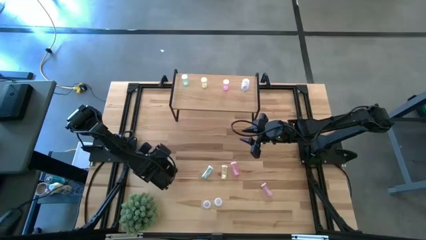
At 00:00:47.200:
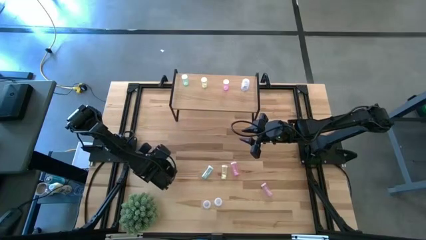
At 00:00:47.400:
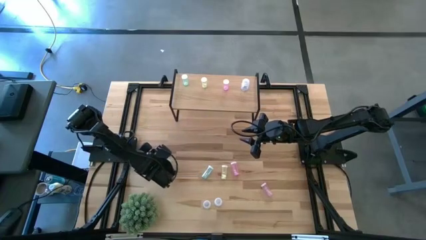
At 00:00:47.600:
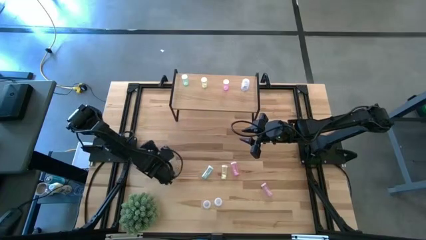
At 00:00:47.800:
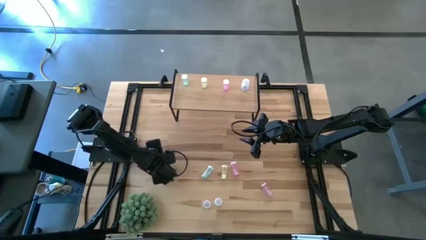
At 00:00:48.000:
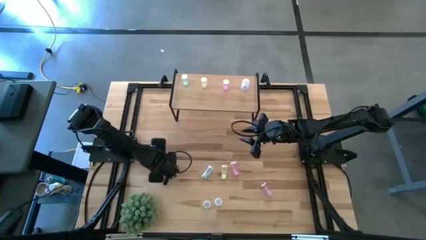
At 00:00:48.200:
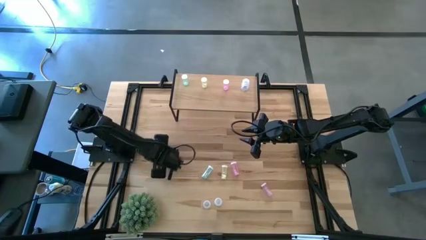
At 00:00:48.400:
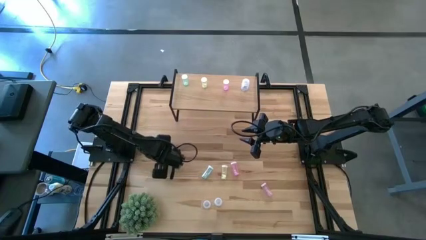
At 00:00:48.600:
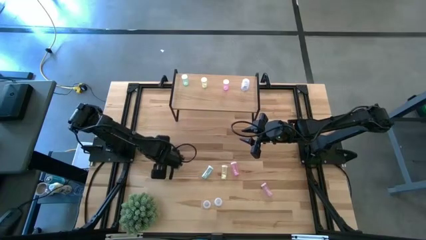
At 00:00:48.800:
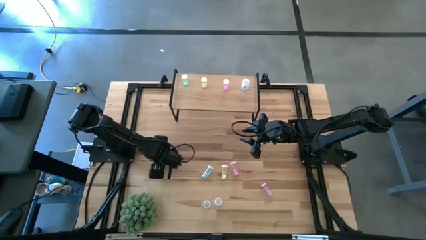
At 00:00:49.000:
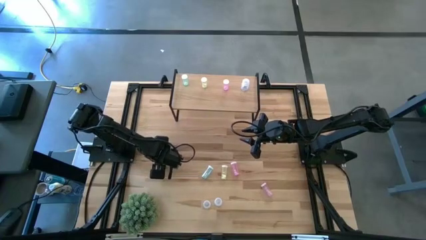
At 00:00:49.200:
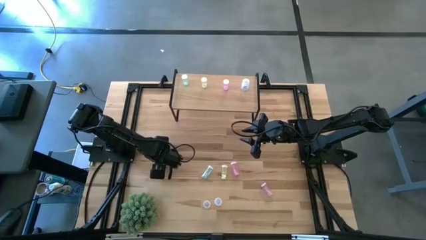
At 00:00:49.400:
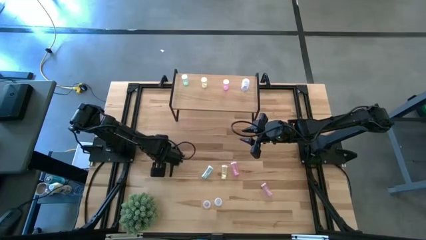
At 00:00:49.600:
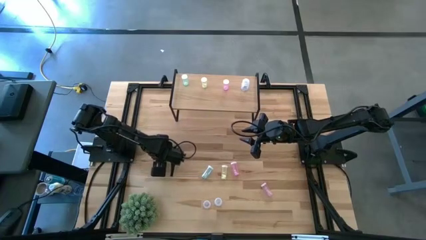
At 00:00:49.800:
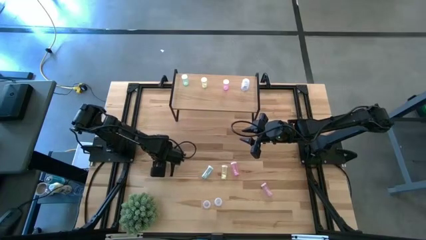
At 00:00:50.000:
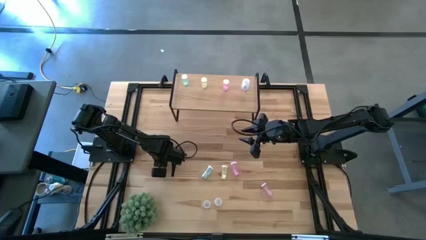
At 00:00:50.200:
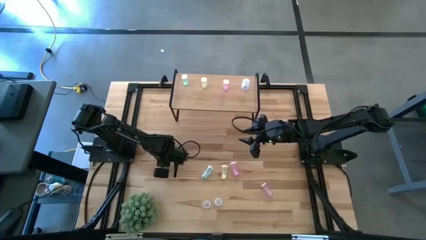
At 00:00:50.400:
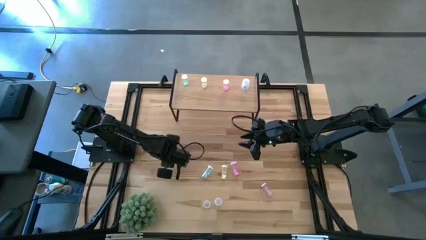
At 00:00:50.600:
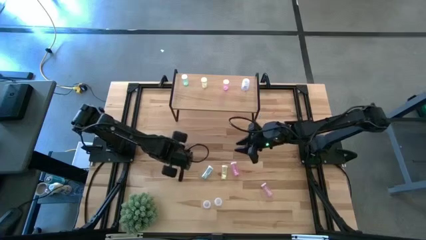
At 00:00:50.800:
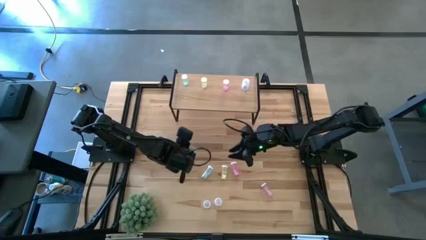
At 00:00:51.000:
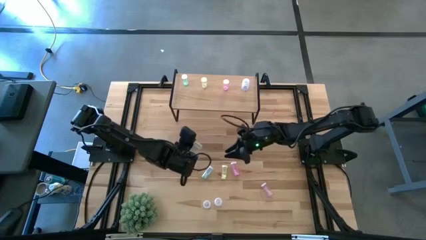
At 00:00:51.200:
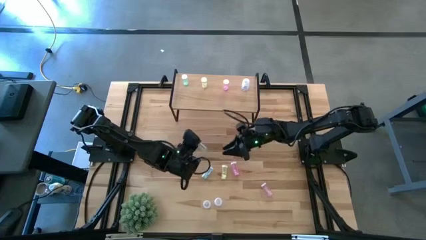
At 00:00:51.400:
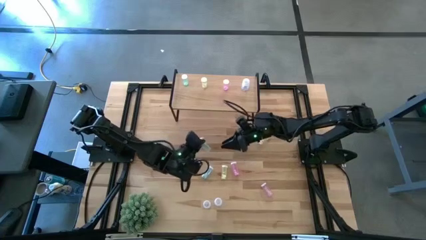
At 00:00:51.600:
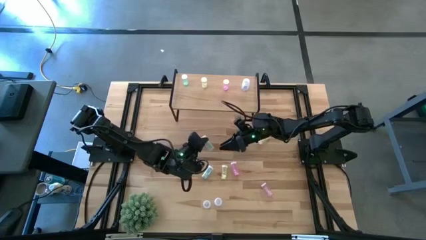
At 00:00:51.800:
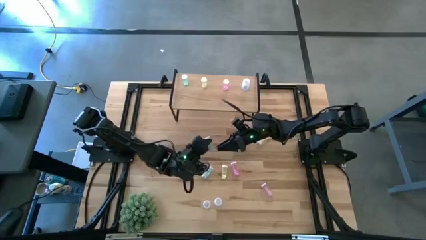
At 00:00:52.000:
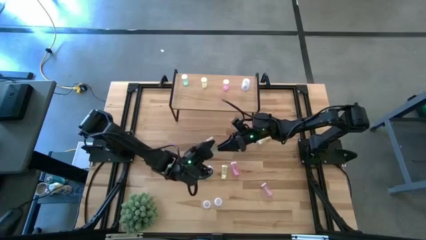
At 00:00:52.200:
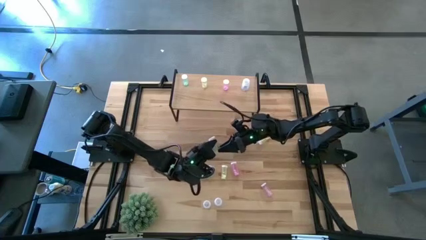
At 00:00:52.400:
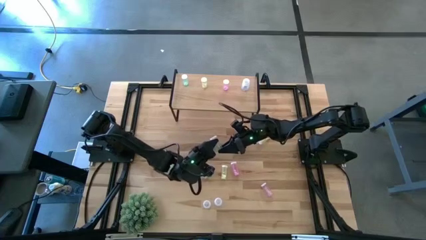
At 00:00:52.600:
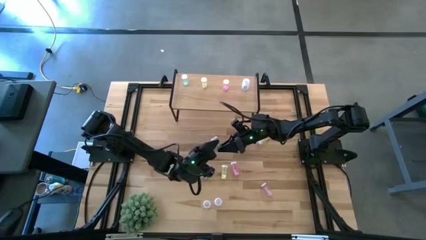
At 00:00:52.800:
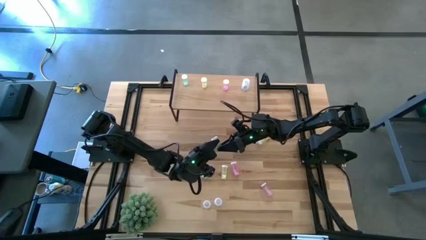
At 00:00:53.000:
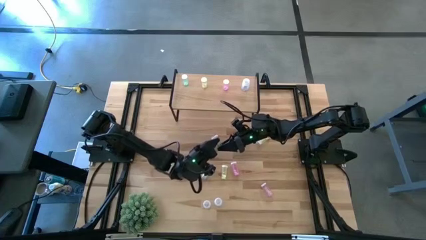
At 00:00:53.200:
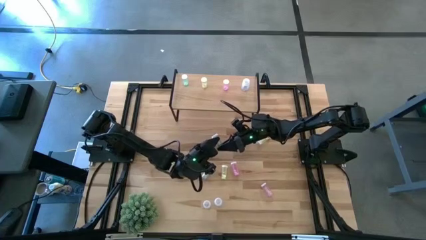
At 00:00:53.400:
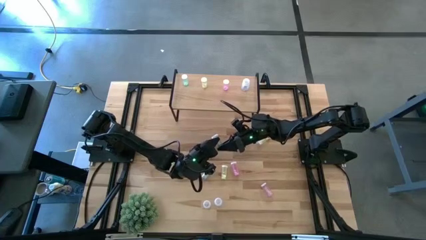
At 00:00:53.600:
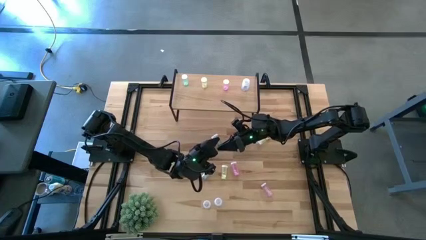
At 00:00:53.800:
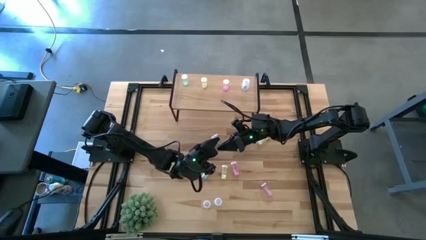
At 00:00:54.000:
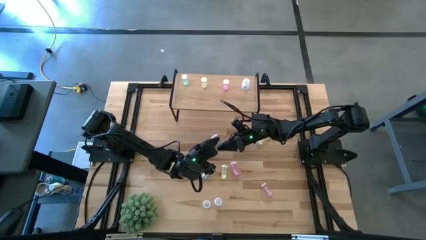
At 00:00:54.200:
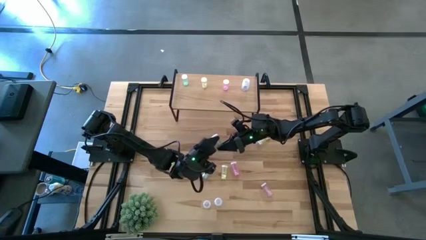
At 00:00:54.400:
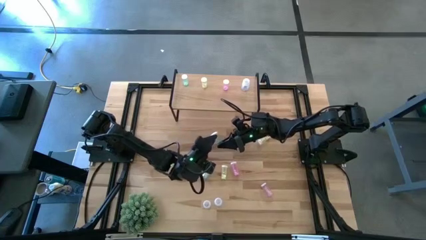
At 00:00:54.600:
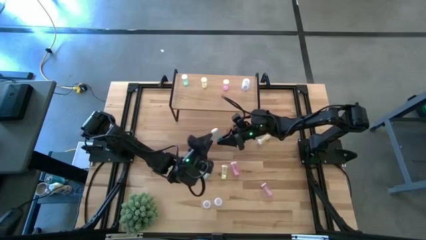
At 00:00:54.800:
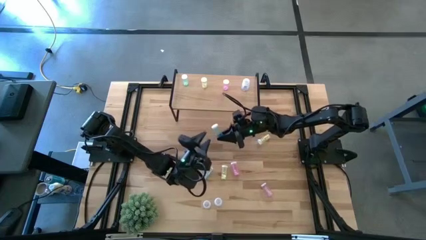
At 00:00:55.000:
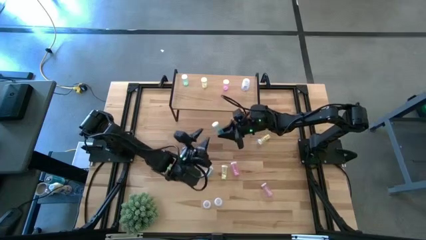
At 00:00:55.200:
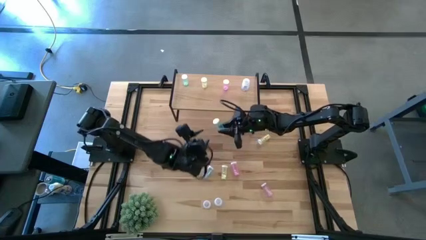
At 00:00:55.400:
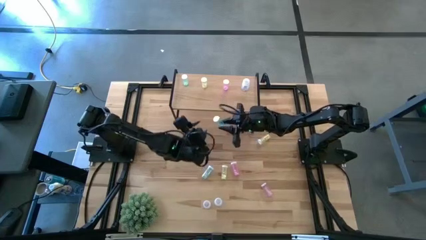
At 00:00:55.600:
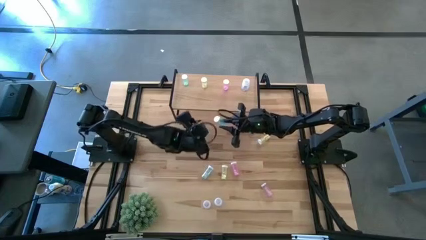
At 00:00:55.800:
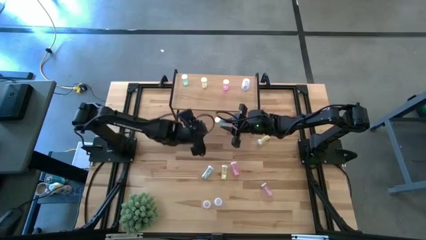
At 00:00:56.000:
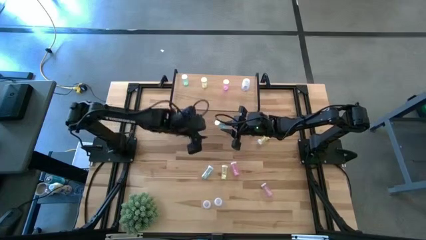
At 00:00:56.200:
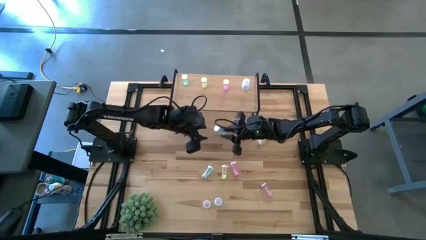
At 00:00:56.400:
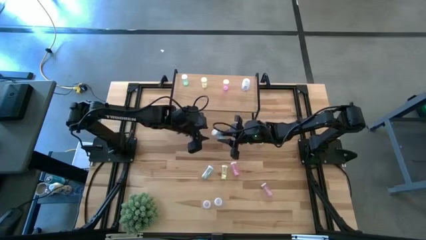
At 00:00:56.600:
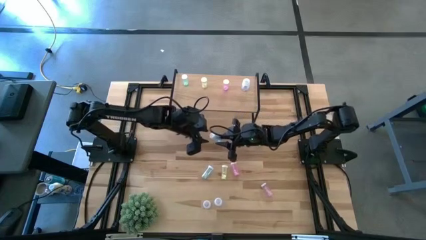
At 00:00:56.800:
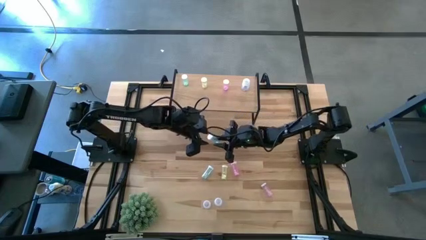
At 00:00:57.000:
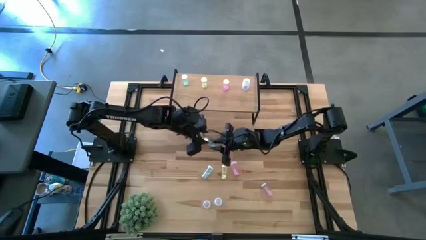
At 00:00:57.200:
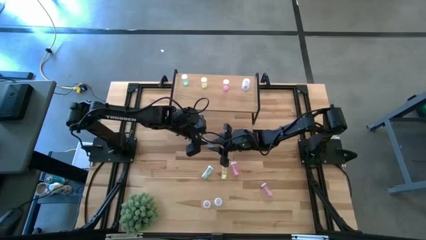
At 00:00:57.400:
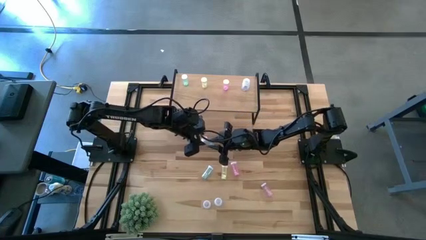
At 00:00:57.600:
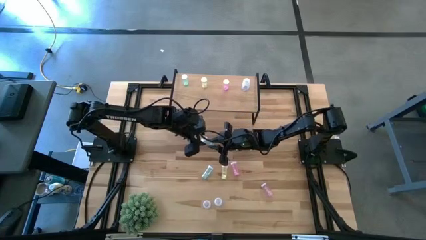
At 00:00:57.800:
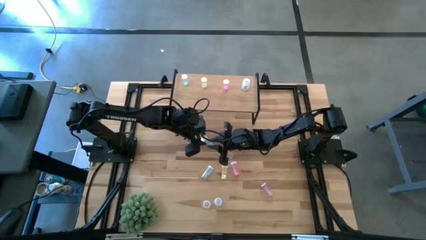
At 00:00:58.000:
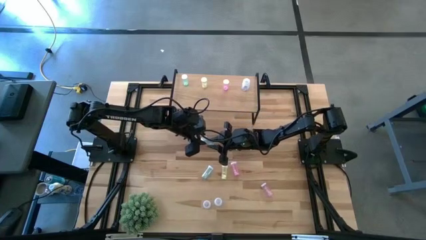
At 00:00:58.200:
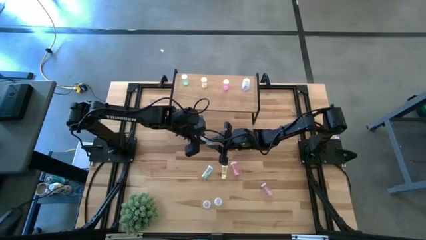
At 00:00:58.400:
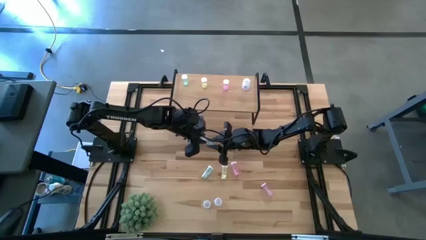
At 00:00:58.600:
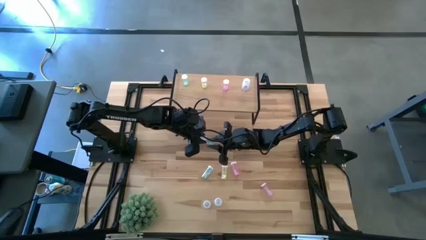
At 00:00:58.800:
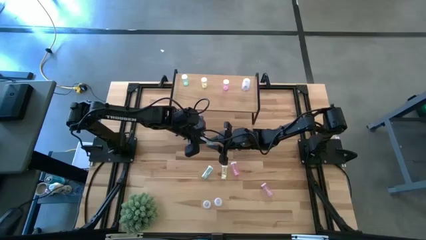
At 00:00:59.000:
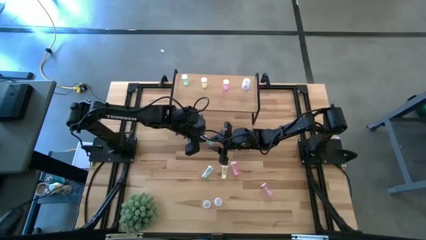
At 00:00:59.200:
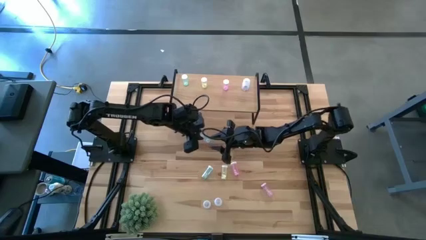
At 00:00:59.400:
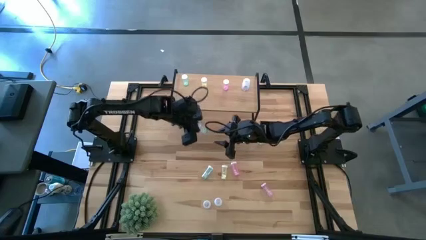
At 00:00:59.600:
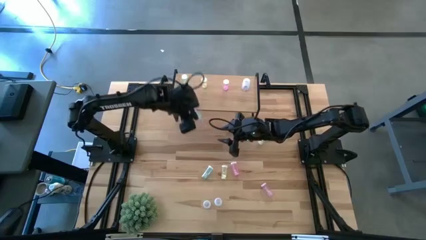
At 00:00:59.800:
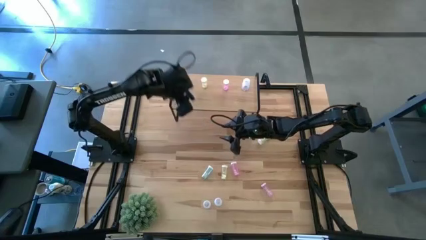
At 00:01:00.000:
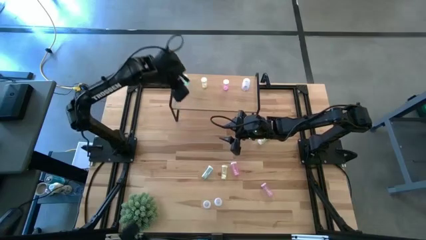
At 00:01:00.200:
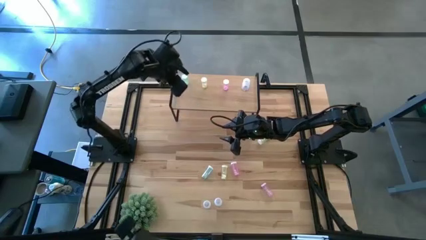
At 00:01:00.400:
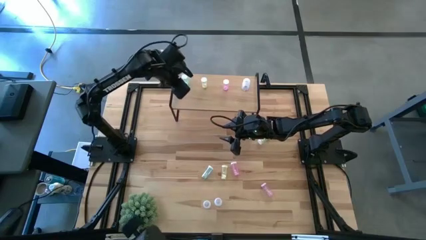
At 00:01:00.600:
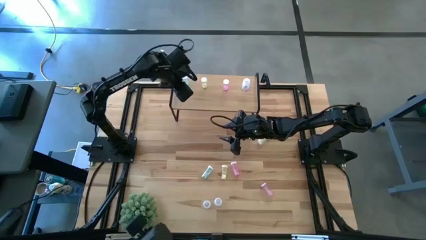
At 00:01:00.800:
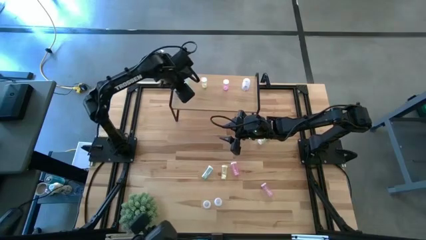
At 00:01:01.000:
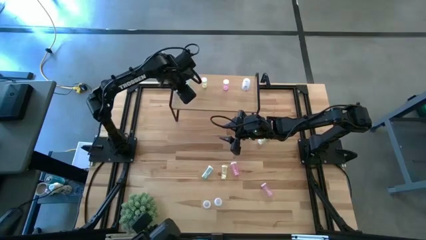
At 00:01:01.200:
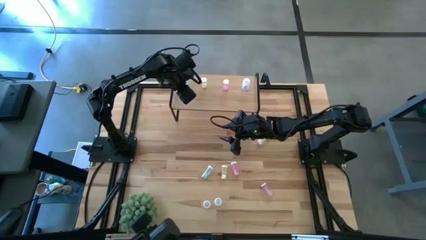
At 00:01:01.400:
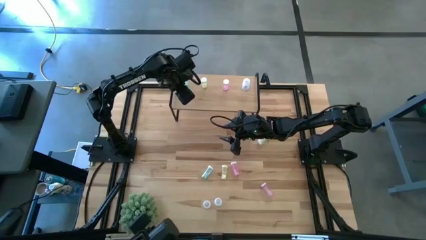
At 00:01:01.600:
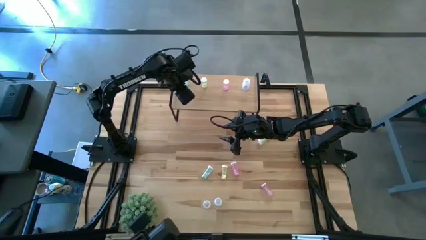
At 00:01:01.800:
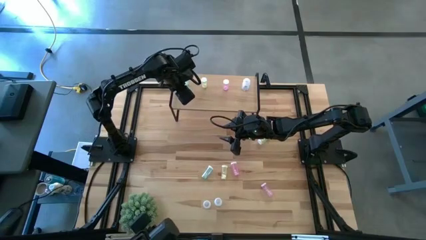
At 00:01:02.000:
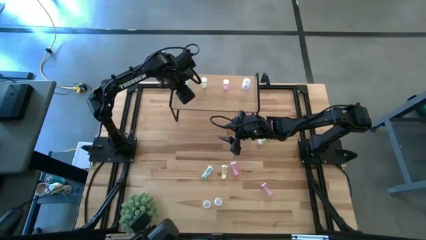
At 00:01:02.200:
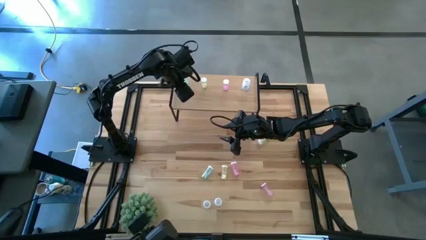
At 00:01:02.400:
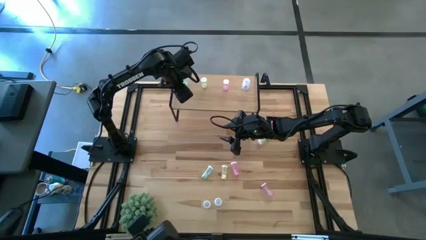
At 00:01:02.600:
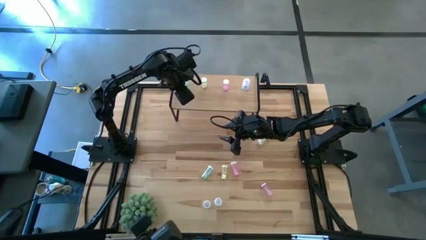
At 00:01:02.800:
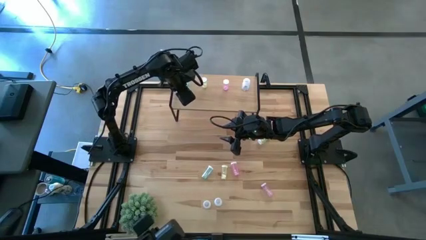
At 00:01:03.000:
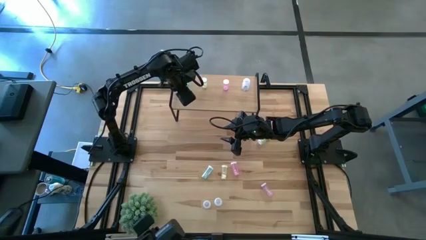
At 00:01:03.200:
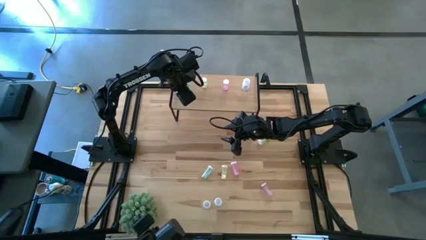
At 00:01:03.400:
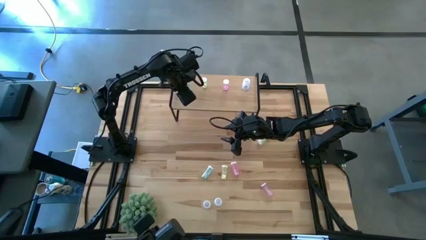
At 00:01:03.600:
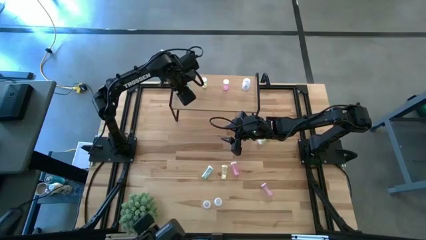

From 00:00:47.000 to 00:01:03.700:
Task: Pick and place medicine bottles onto shelf by color
Put the left blue pill bottle on the shelf aligned with the other blue pill bottle
